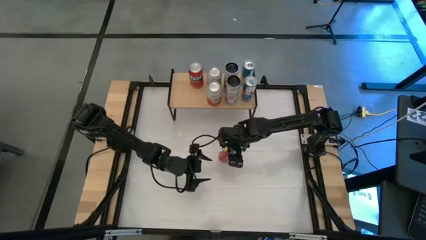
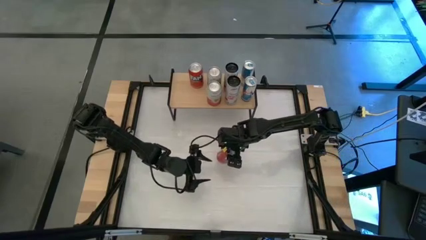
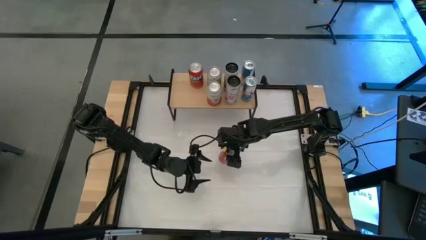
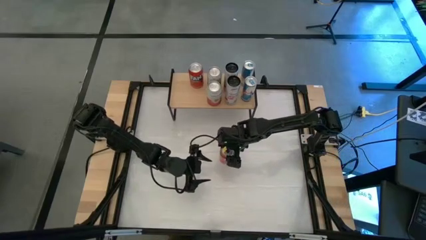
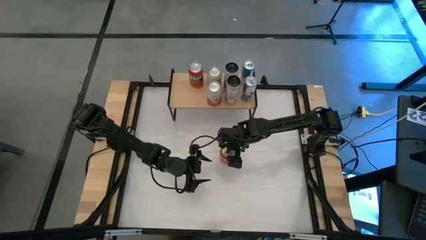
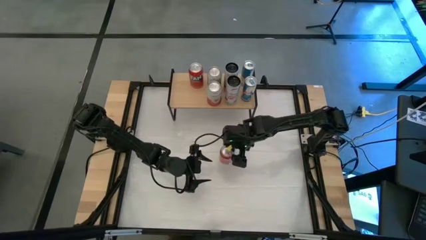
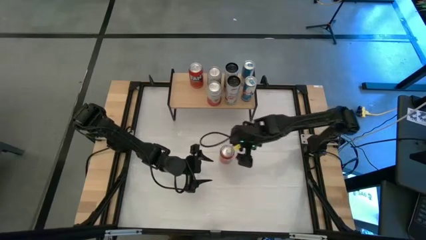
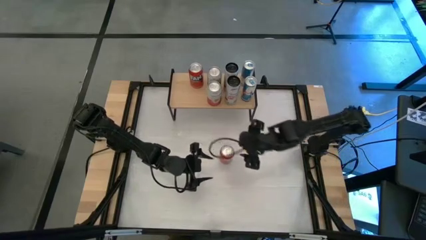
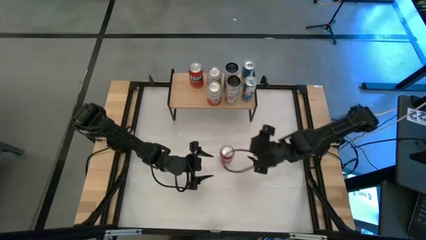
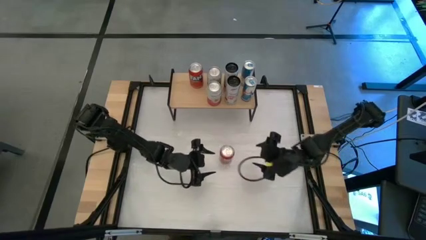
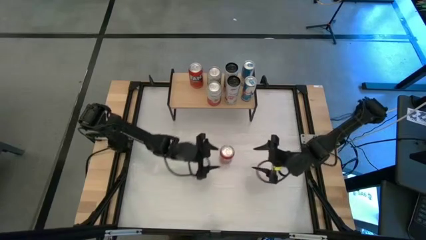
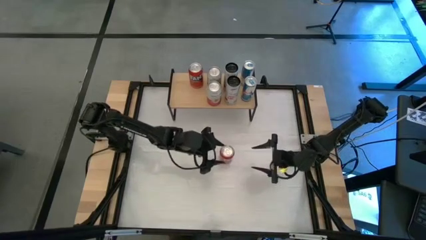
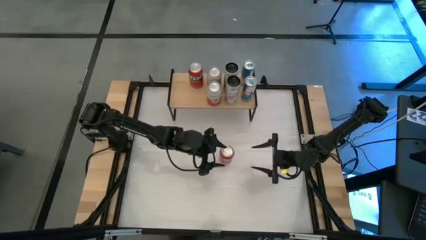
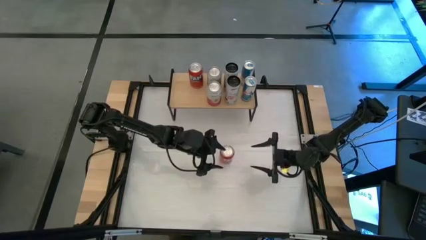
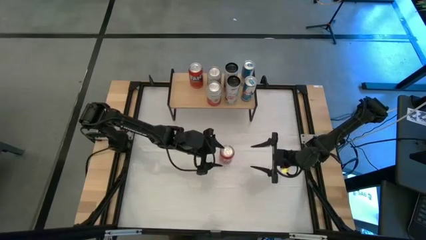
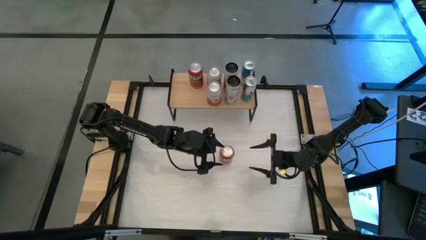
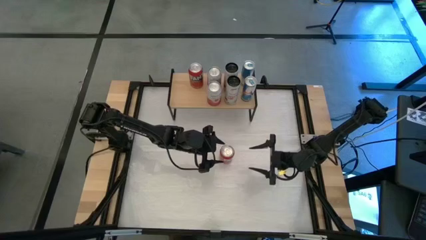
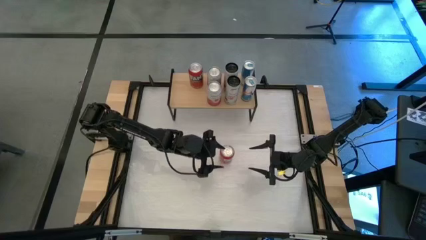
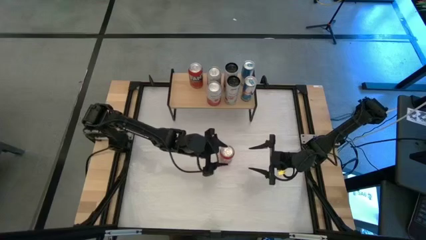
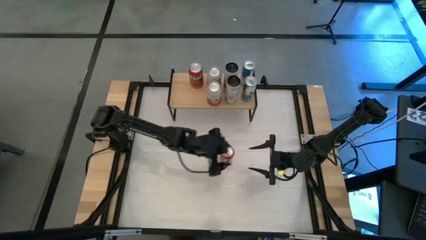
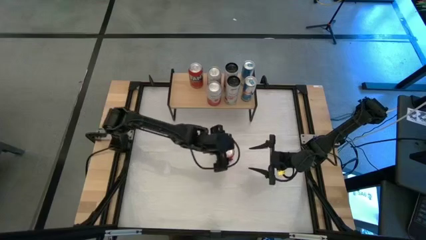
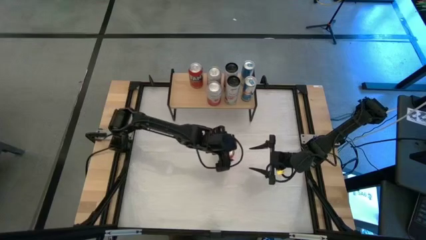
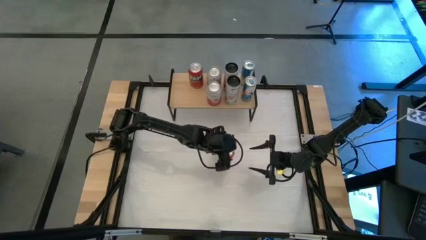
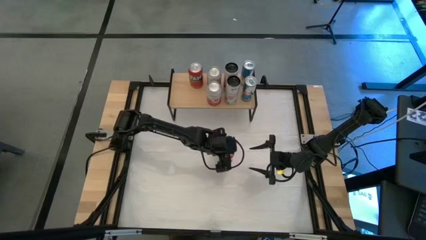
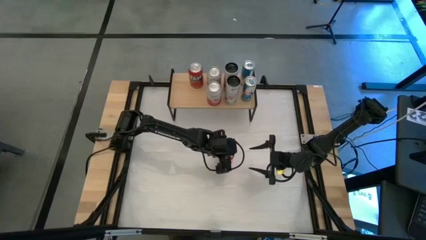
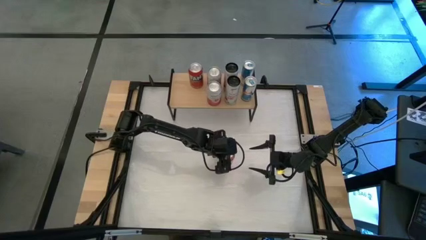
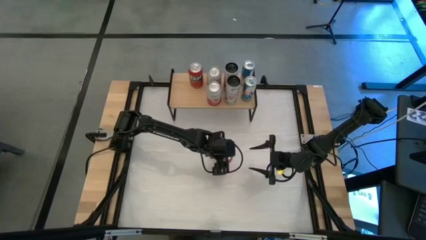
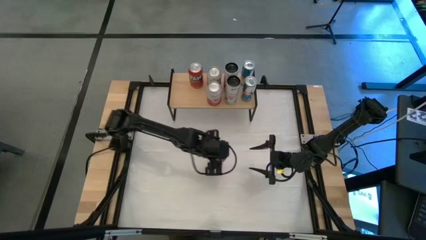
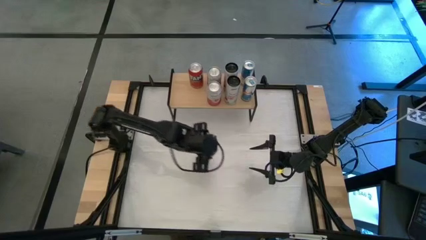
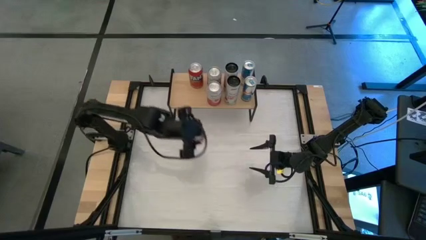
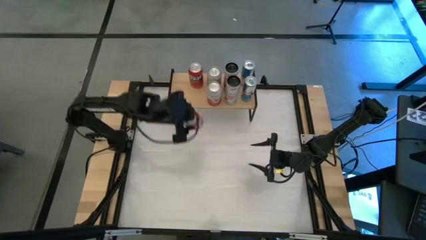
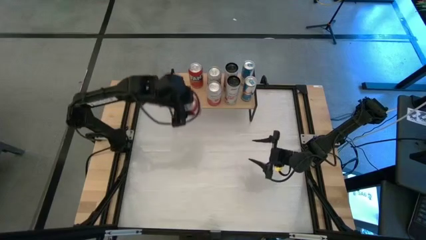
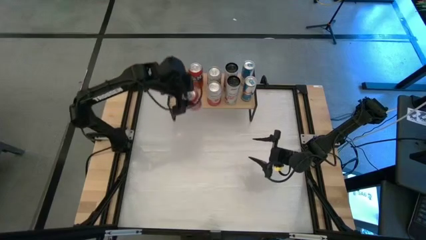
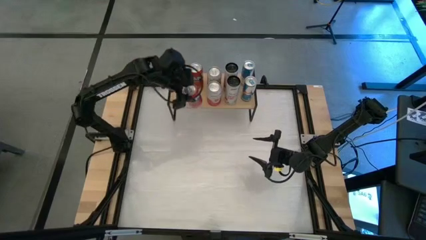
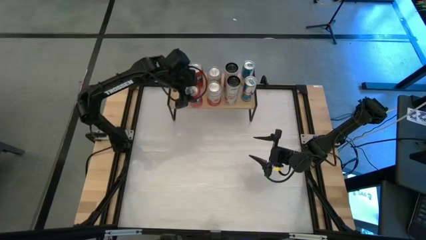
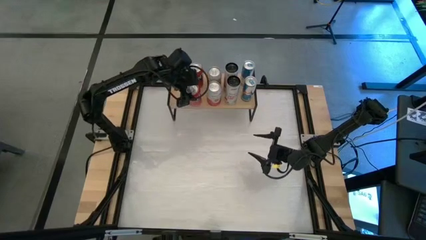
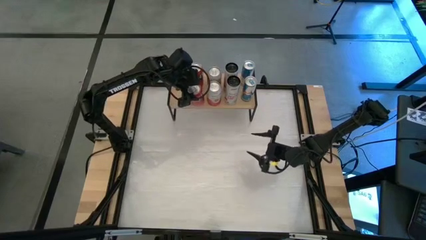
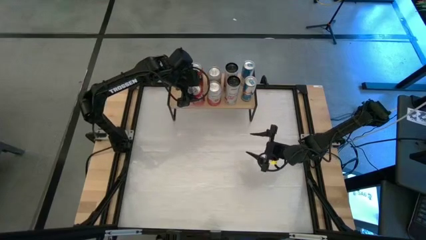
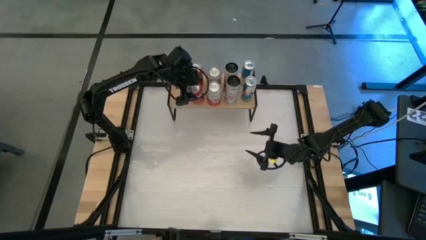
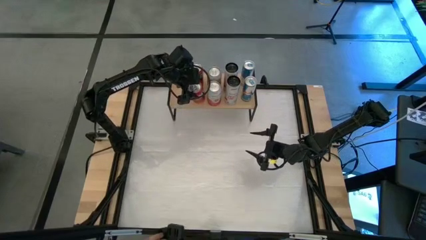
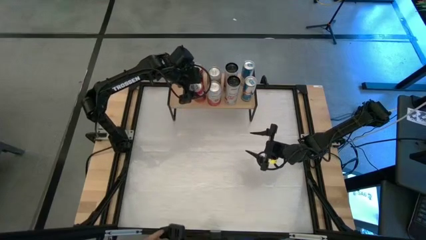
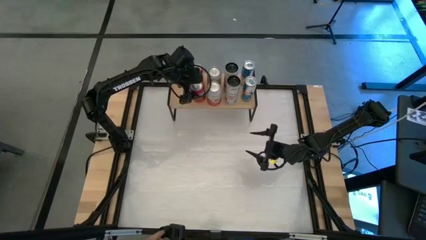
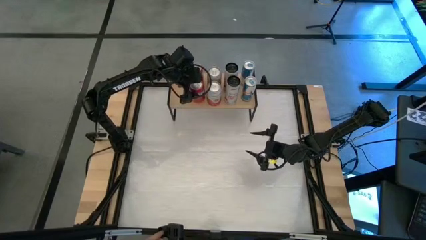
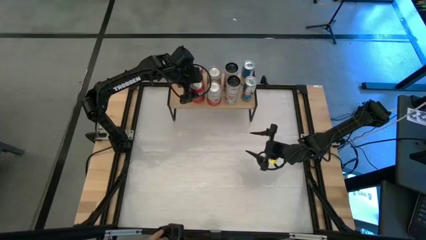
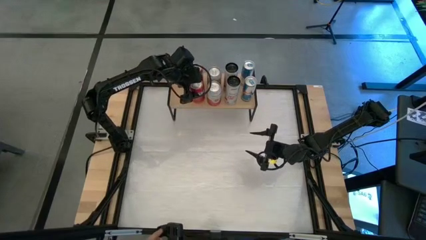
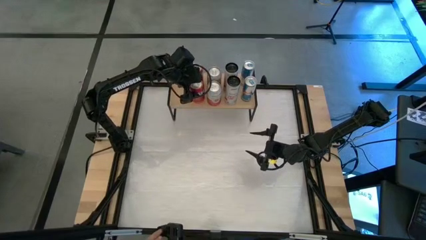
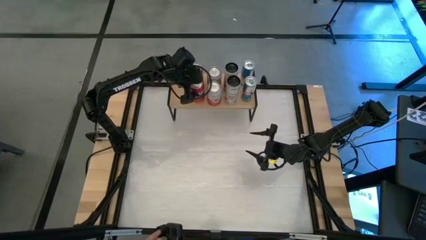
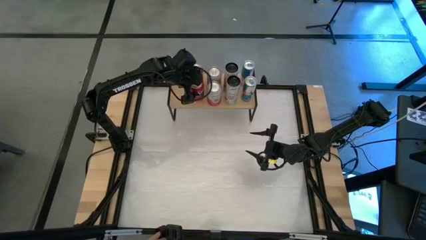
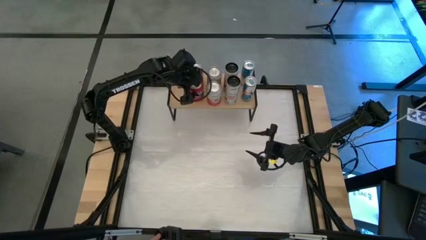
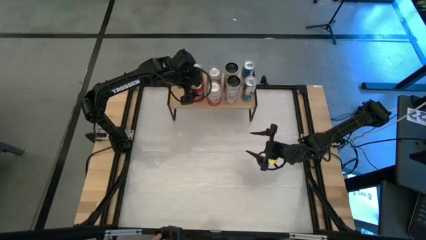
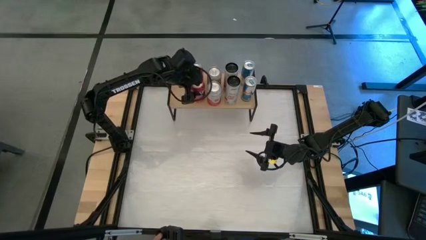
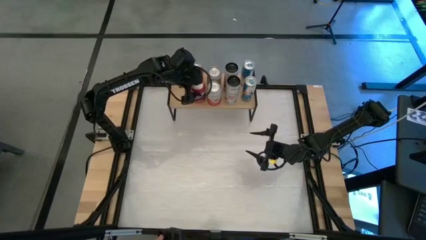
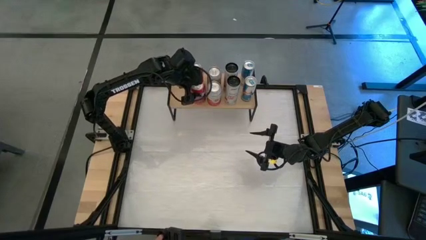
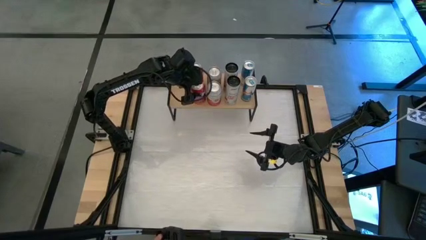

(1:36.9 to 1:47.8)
Task: Place canned beverage on shelf
Put the red soda can on the shelf aligned with the other red soda can

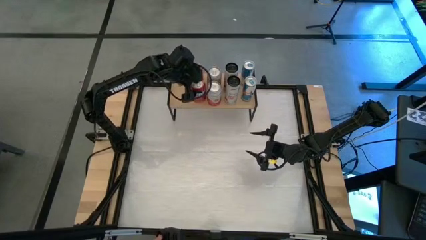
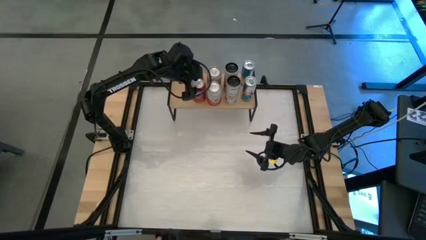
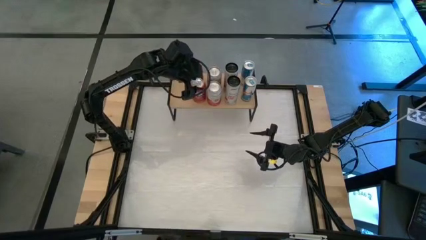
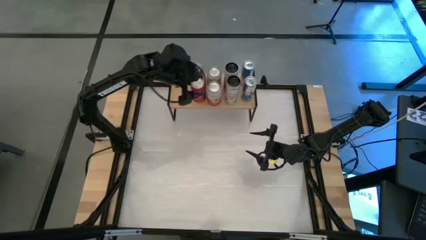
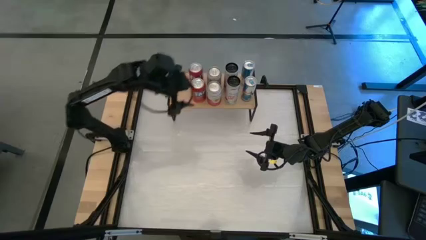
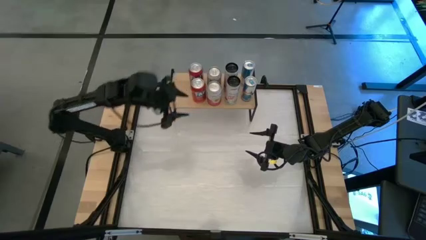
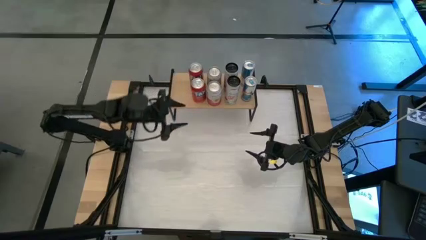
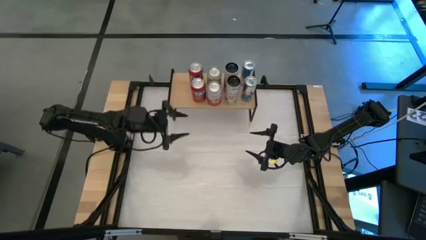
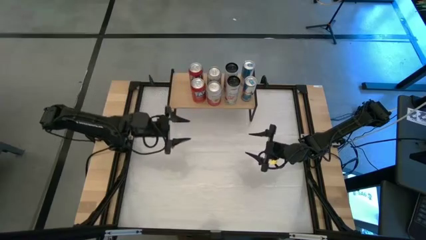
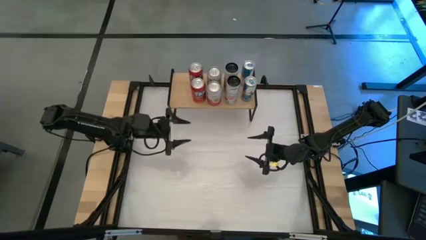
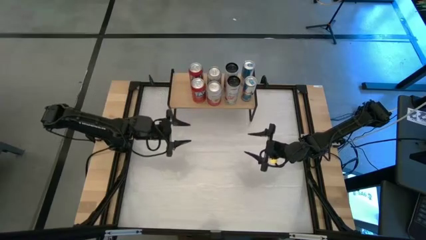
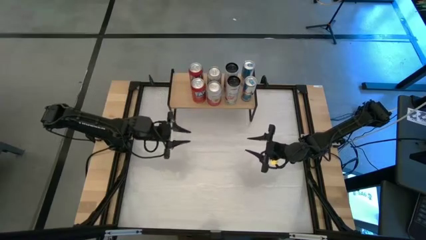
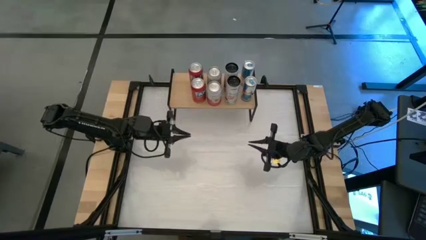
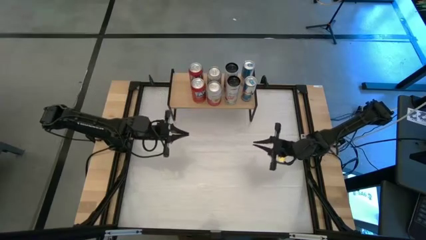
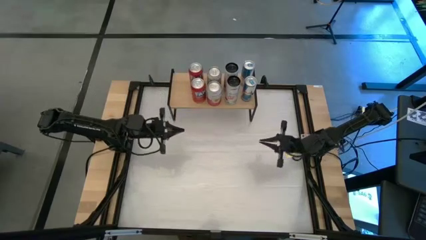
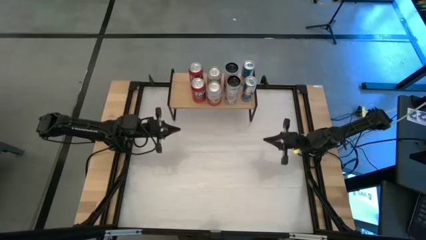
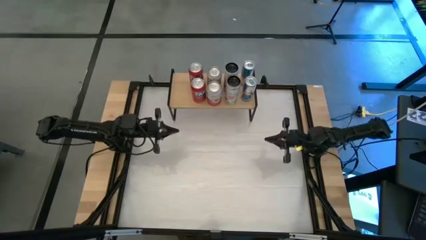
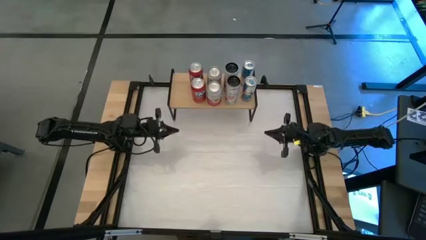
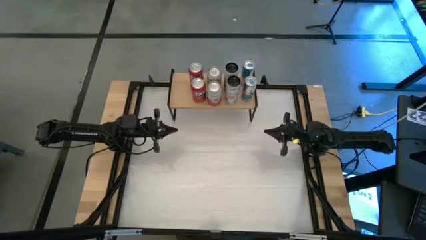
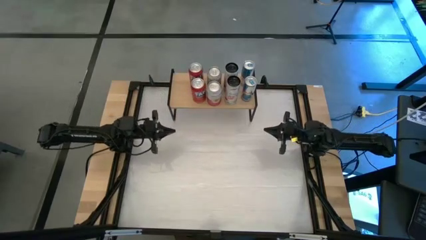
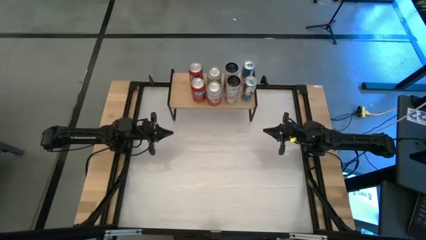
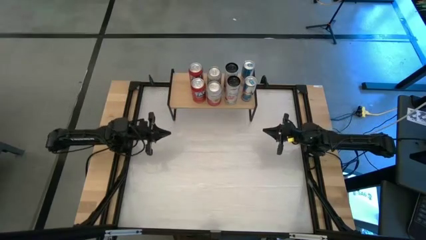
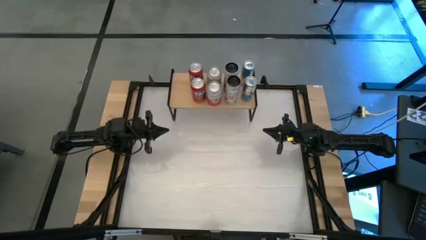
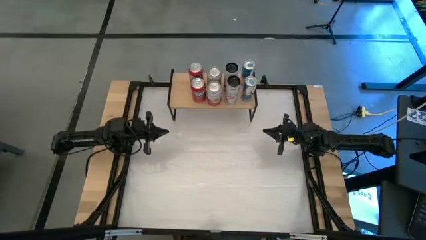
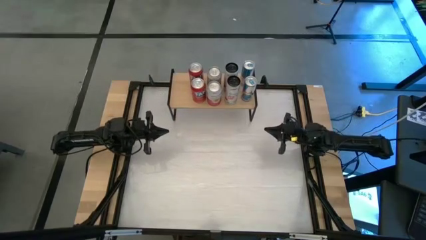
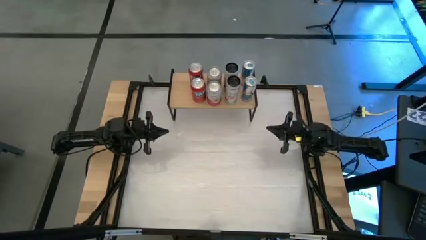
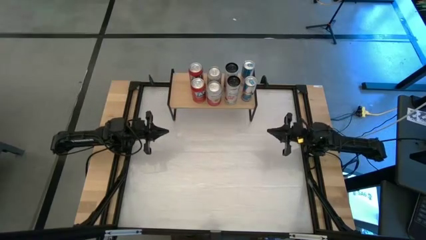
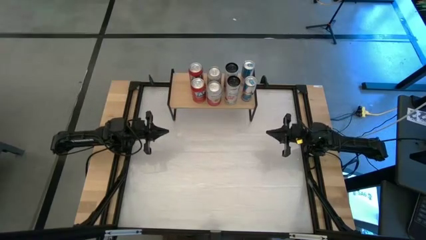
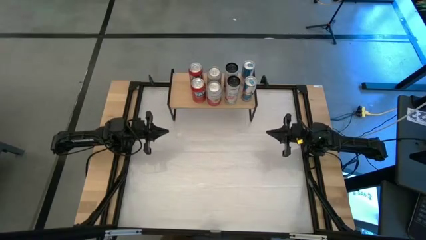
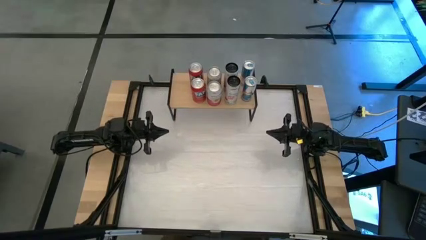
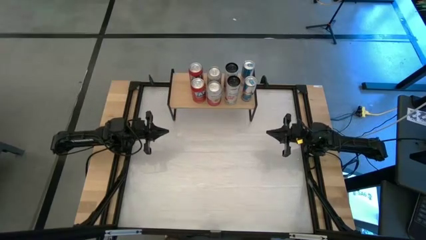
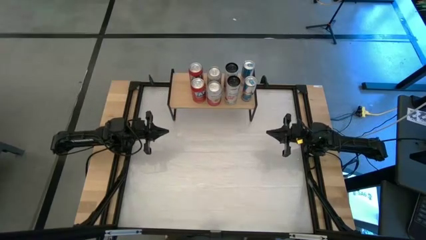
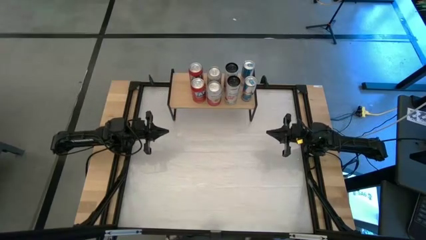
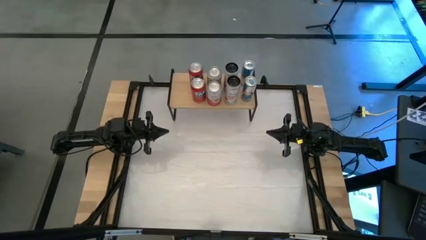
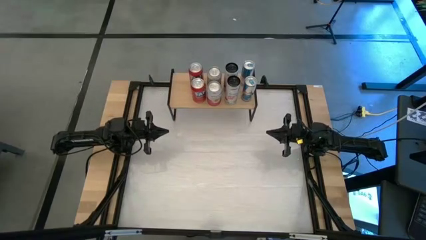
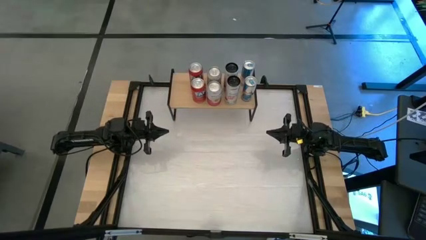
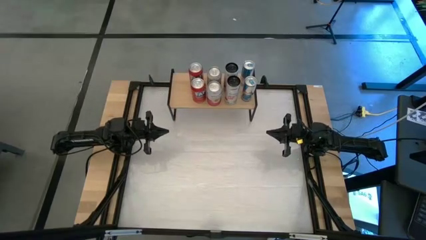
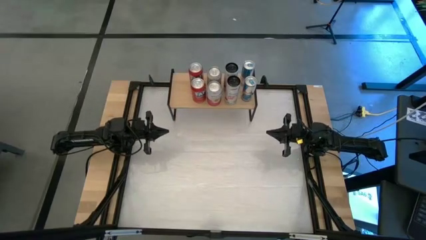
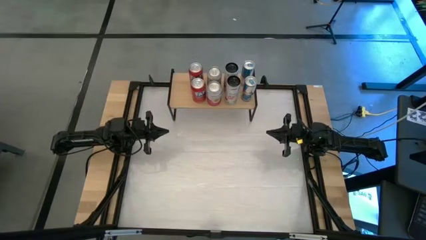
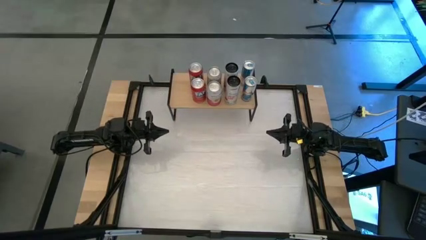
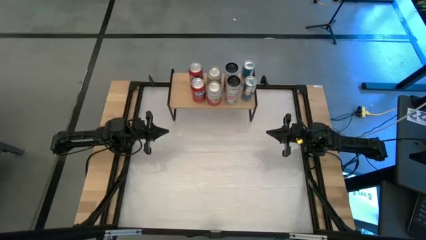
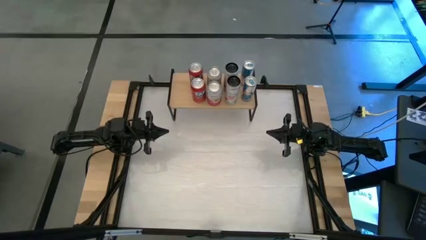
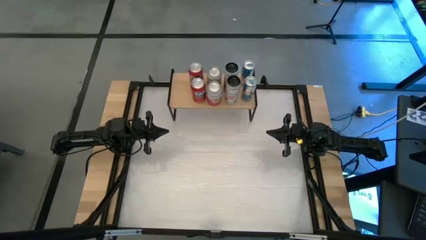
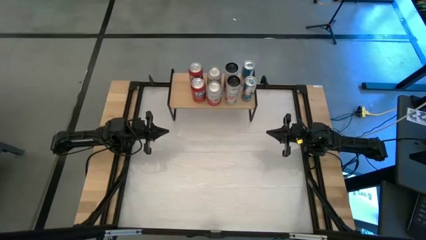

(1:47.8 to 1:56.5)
Return to Home Position
